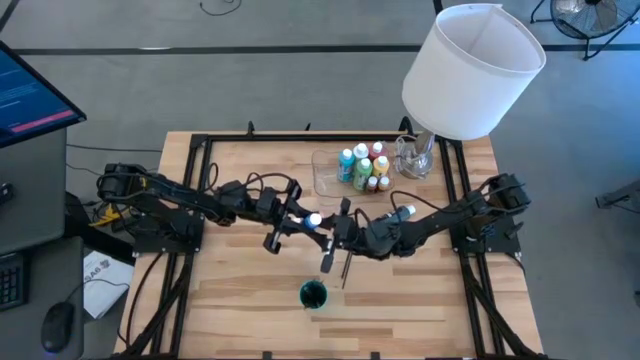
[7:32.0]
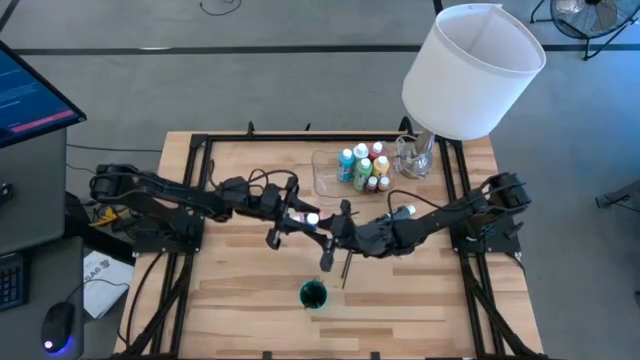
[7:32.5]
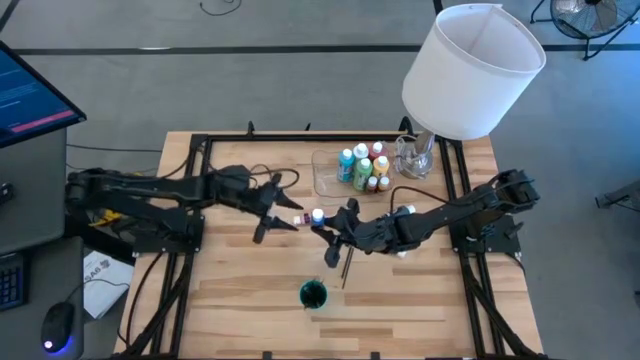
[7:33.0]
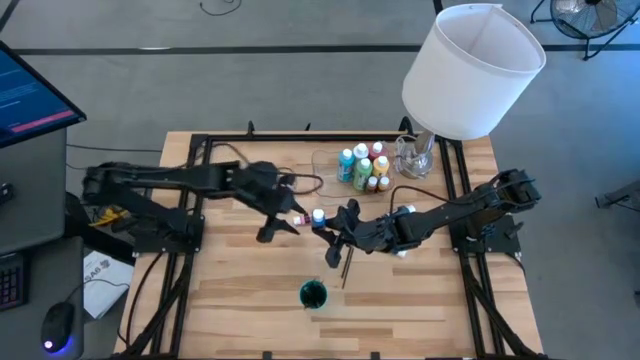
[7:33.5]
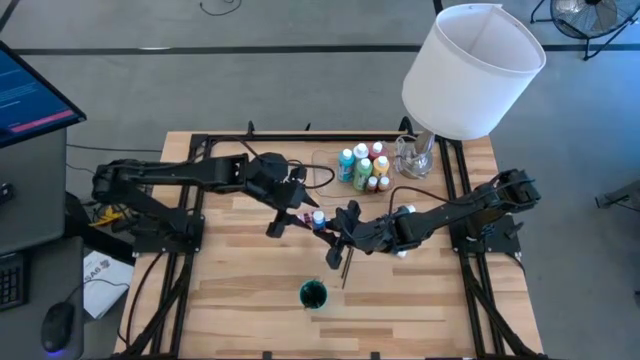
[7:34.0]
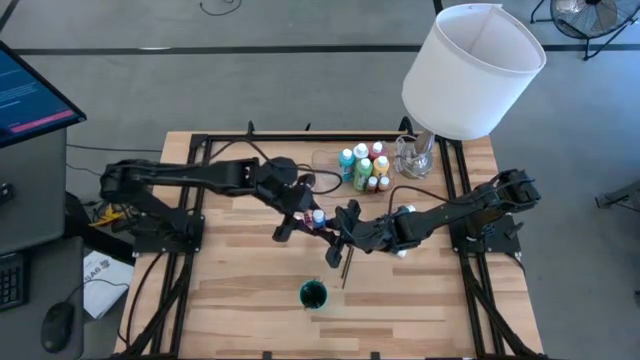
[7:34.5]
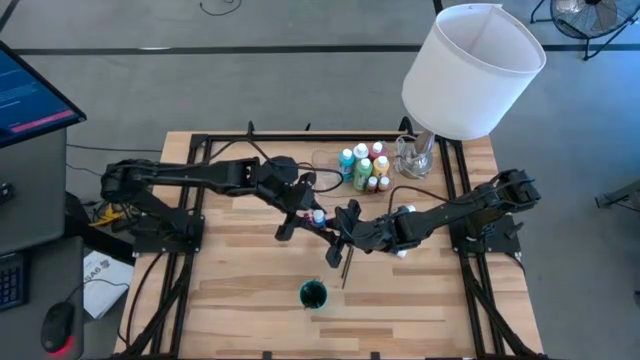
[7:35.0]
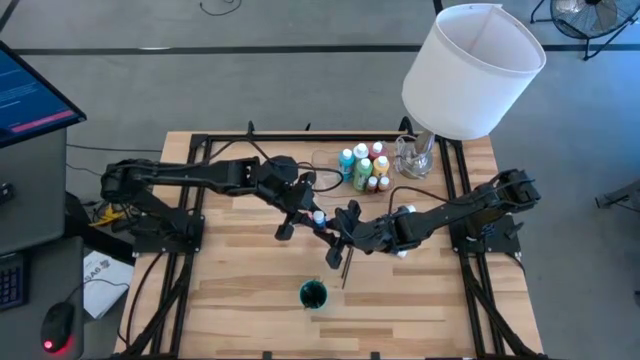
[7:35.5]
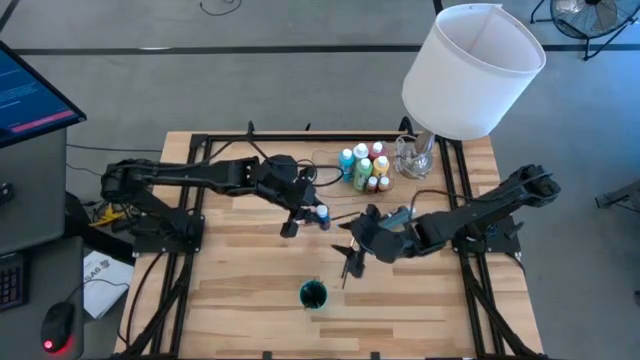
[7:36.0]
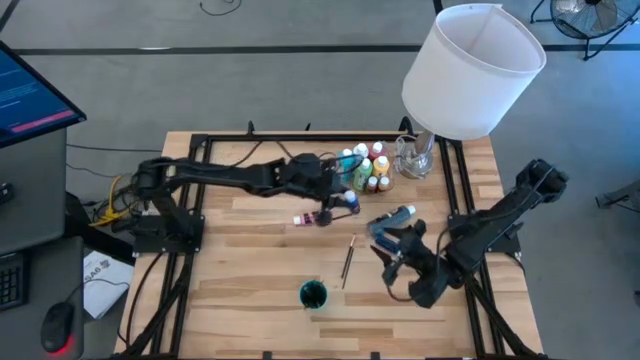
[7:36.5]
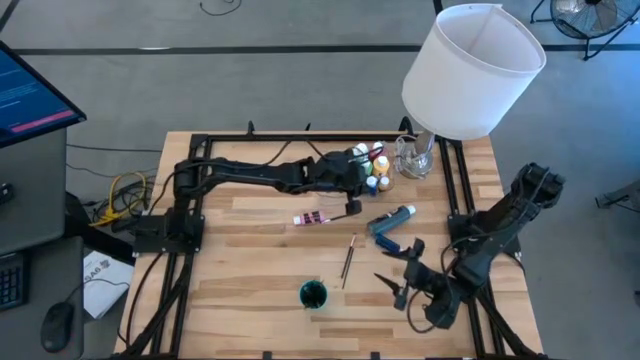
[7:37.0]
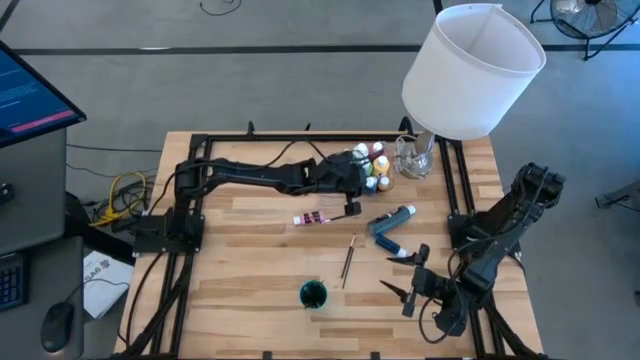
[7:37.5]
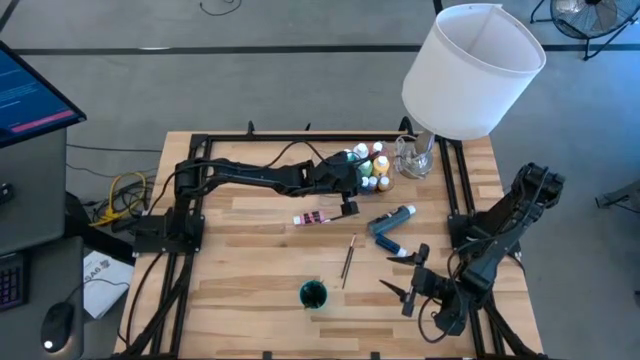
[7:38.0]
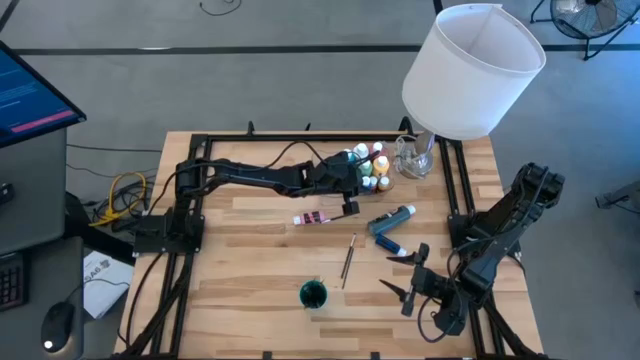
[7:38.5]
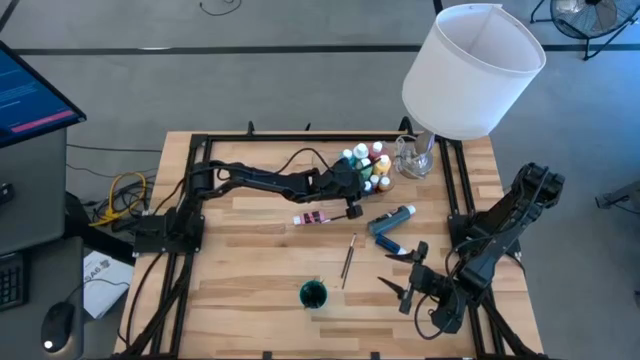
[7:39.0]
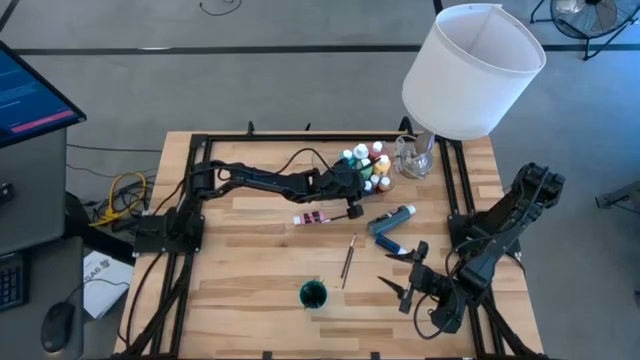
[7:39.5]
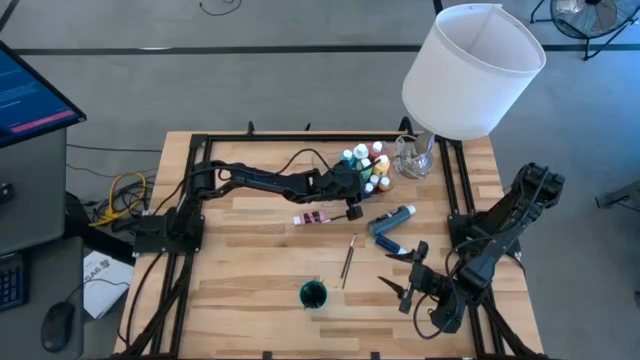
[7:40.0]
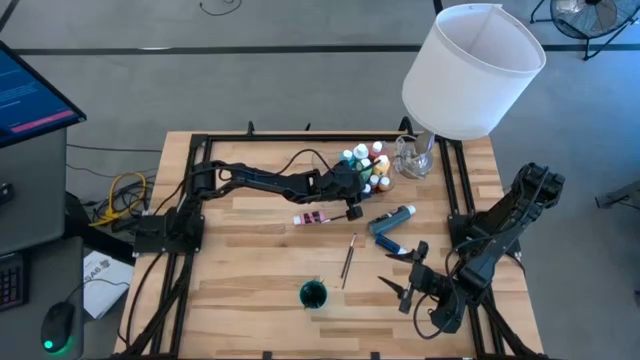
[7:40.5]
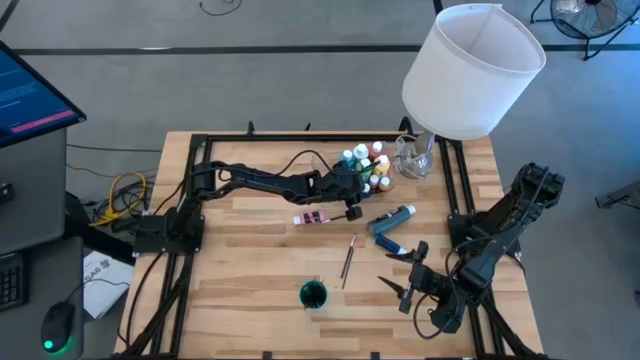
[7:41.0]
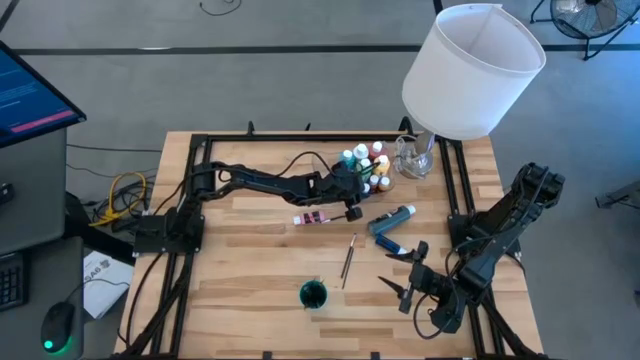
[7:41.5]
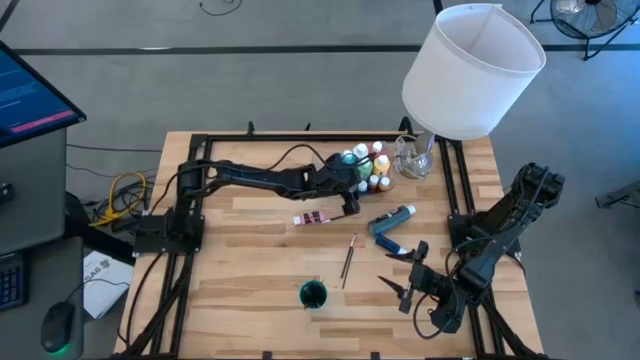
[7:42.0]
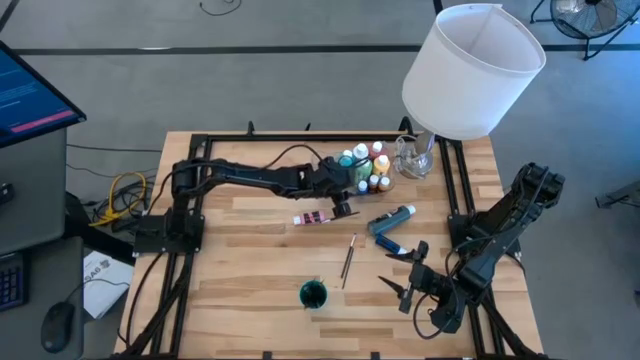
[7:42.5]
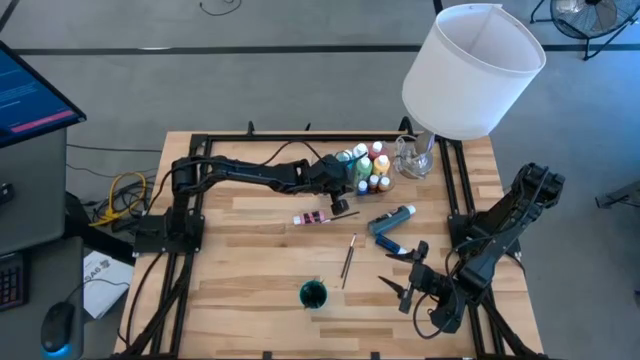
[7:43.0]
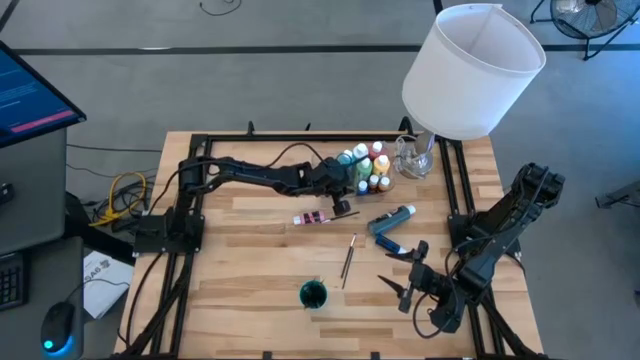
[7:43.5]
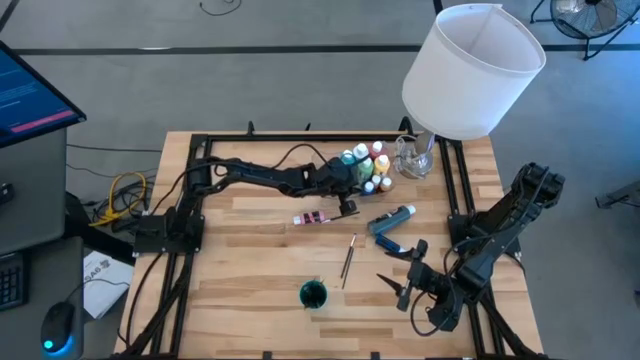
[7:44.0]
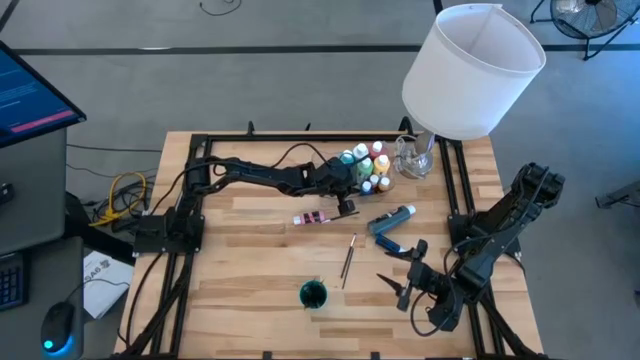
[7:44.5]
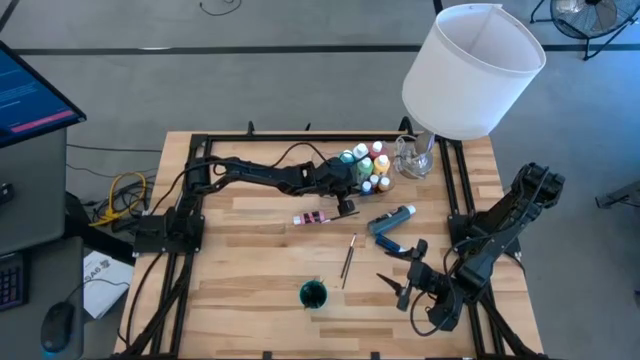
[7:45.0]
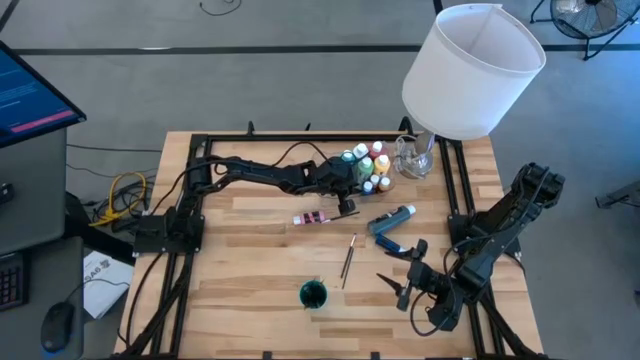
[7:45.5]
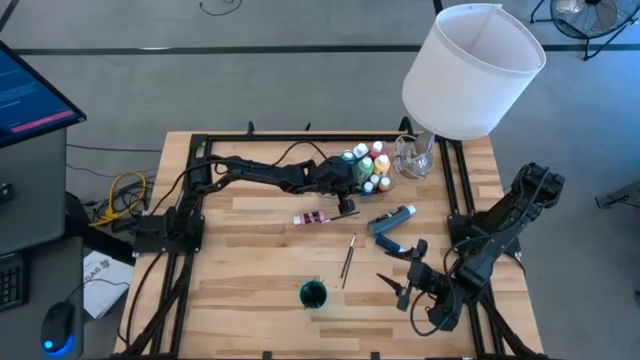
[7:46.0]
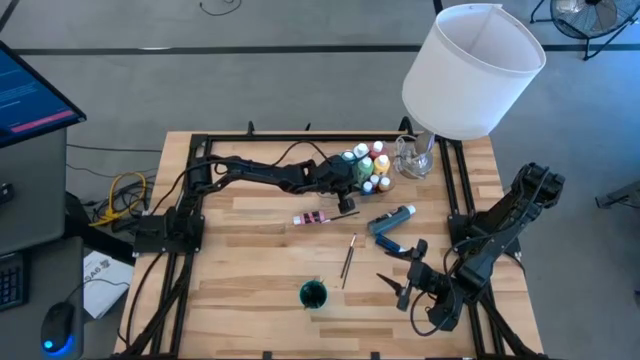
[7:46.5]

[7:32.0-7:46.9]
Task: Pick & Place Paint Supplies
Put the small blue paint bottle into the transparent bin
